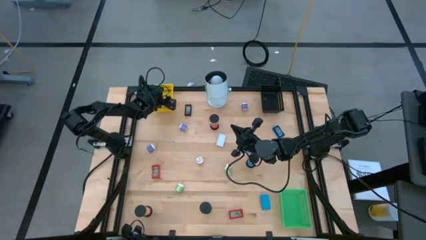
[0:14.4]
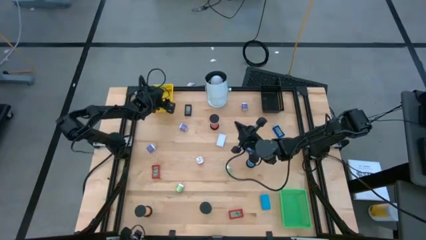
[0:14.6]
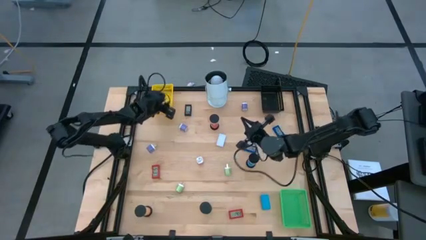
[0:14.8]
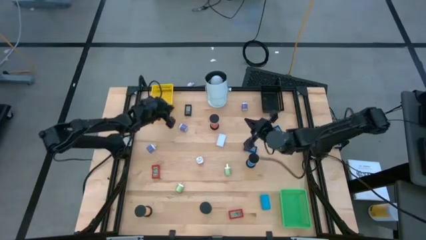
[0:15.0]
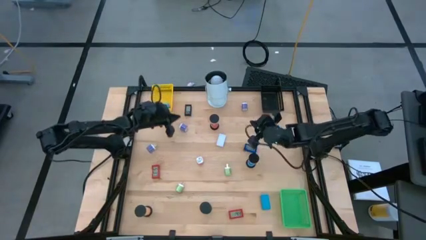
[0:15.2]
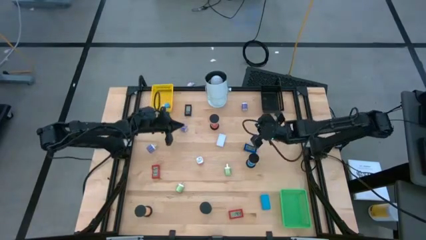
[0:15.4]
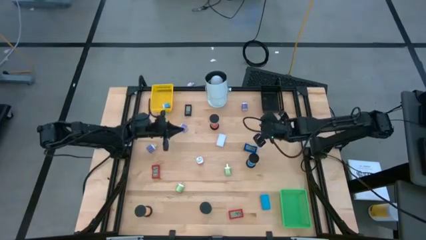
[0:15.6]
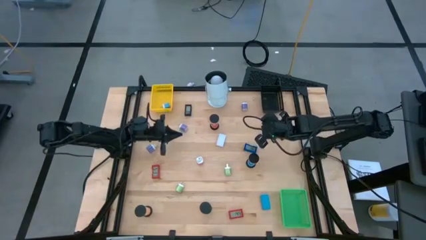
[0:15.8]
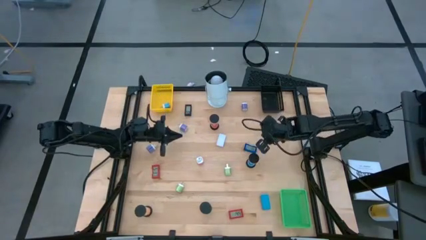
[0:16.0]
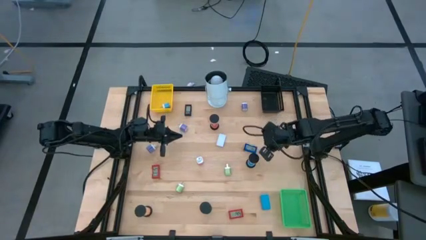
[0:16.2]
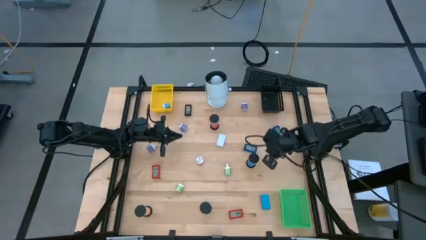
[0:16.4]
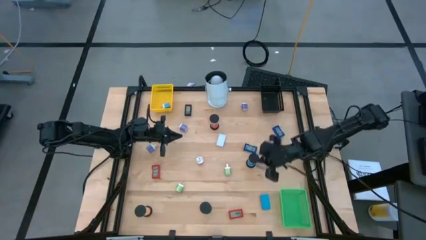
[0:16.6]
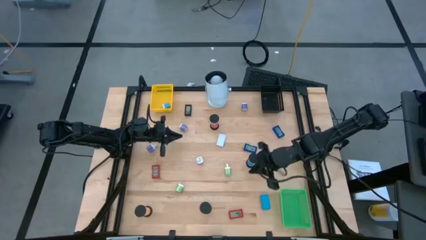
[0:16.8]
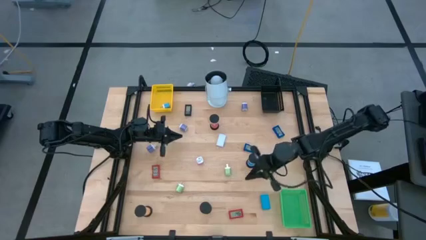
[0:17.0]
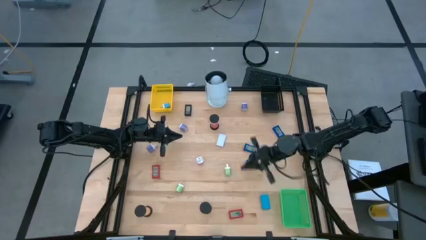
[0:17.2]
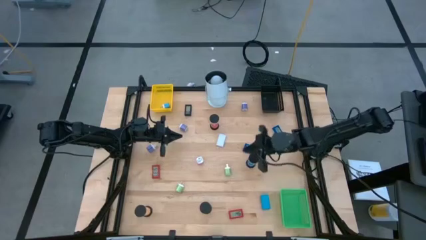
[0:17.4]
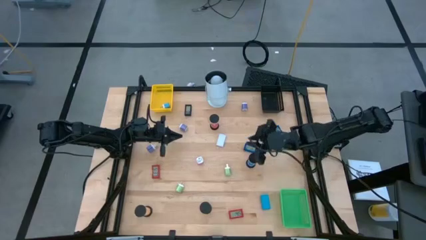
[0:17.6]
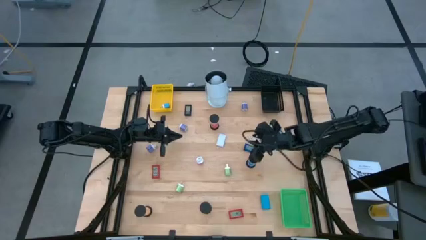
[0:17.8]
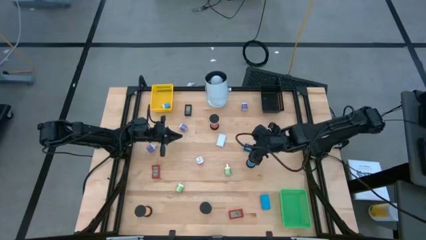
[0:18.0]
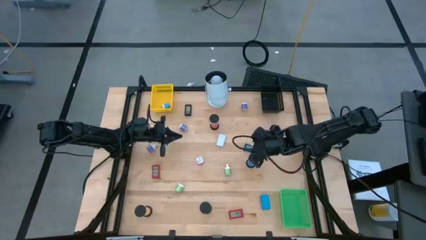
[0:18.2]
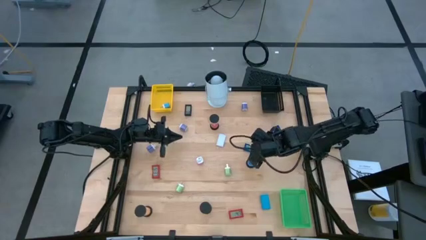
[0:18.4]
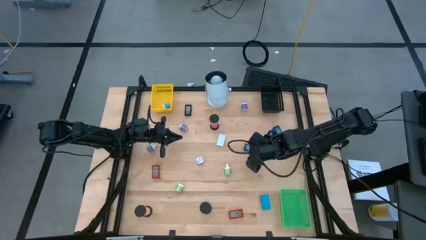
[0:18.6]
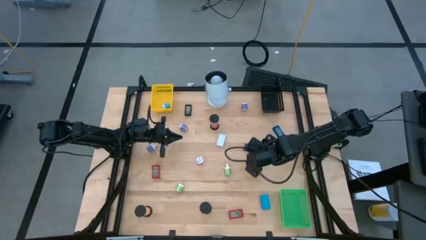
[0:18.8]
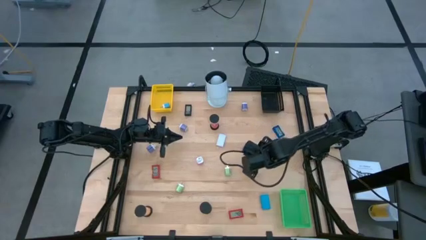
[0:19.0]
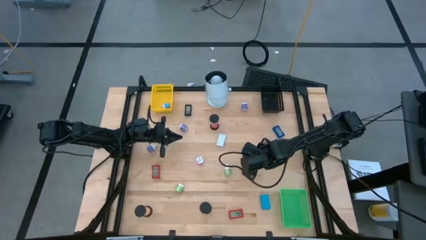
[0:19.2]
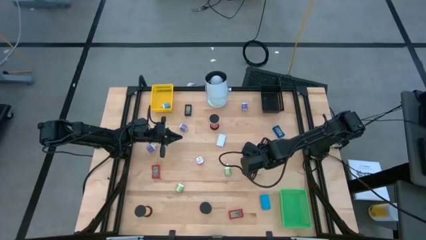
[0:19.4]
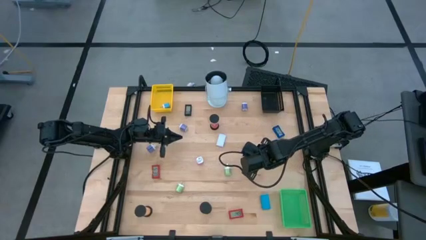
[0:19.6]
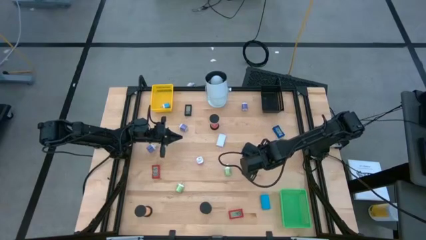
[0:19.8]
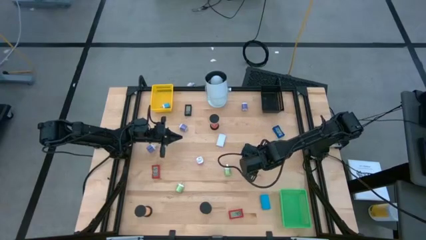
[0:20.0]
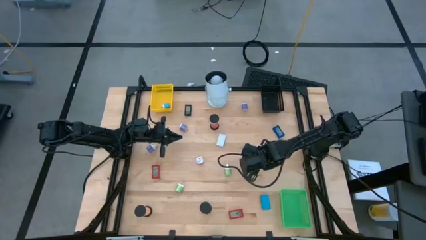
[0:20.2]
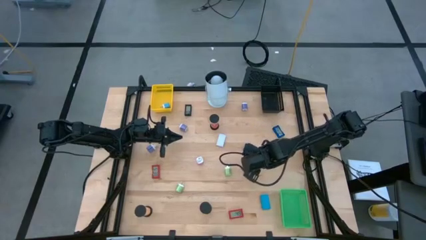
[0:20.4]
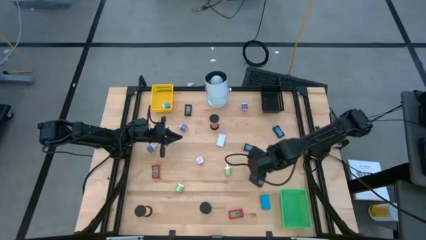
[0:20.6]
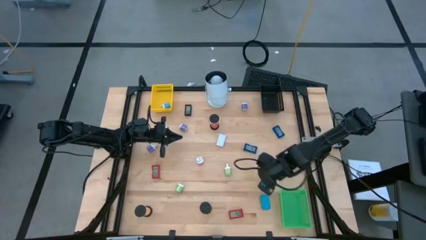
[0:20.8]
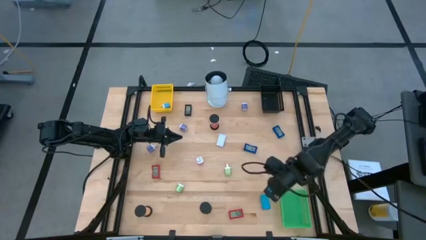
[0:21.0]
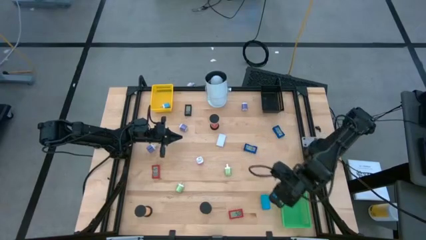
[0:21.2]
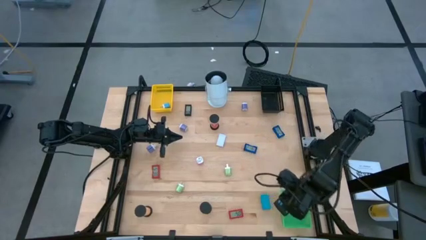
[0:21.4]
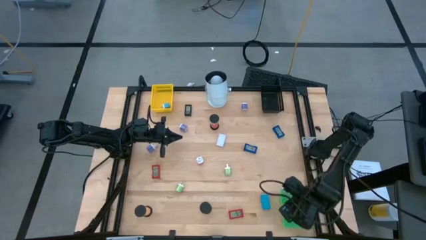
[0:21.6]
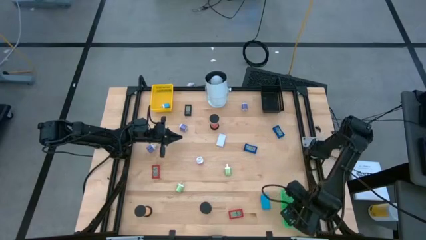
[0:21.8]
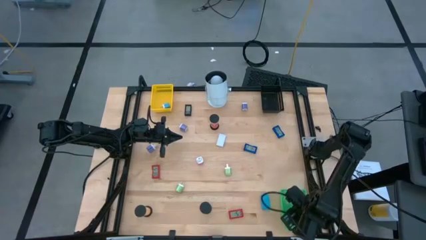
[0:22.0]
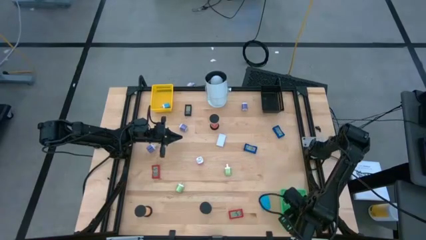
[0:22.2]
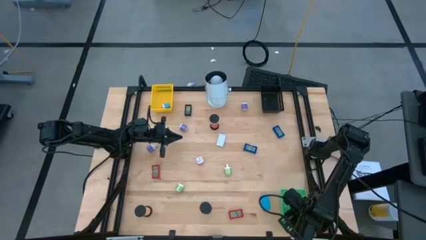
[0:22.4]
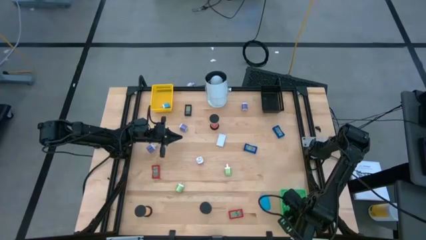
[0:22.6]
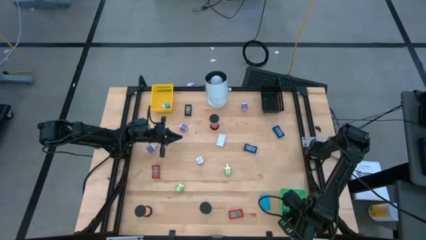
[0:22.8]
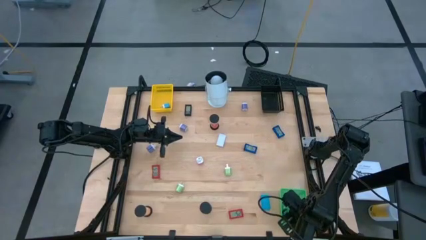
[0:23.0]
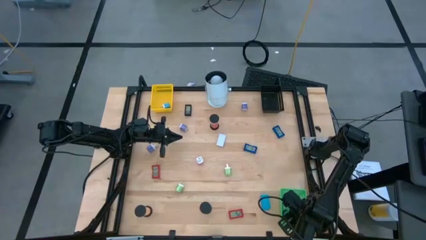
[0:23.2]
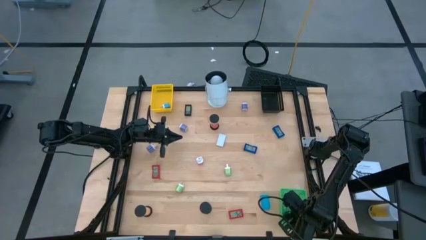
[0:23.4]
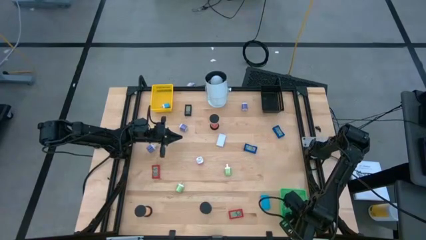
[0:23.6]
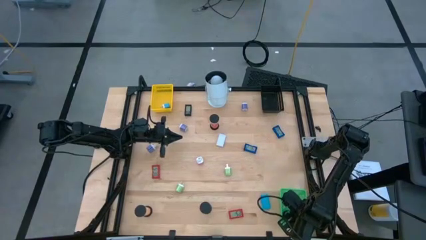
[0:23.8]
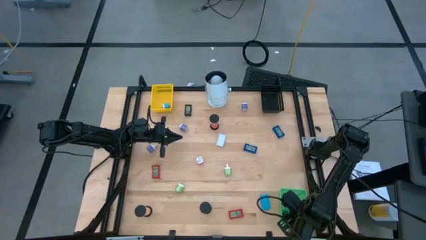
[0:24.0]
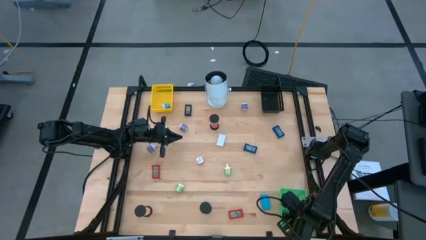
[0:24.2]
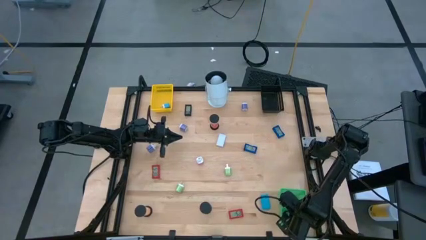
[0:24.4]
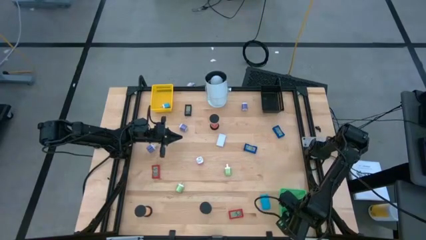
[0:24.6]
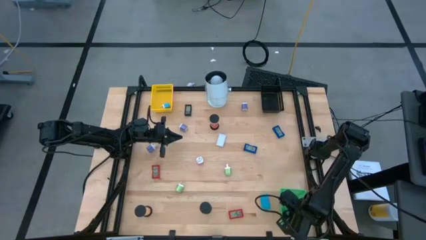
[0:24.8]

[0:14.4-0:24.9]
Task: Pick & Place Office items
Put the blue hourglass into the green bin

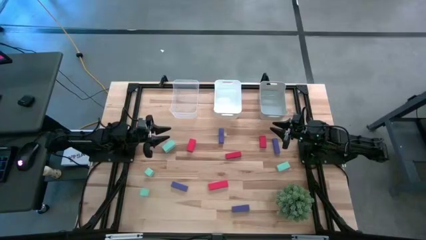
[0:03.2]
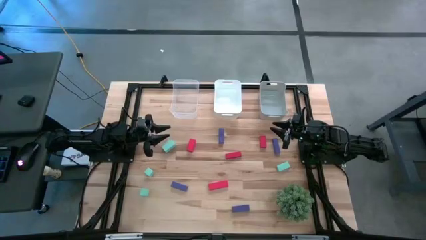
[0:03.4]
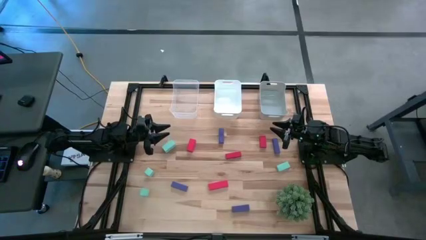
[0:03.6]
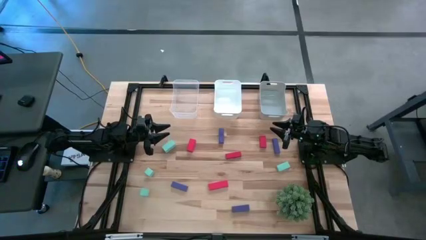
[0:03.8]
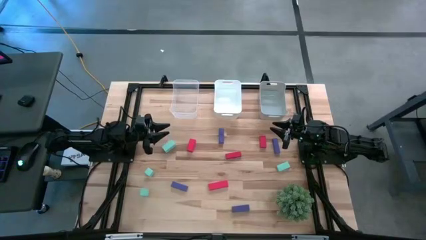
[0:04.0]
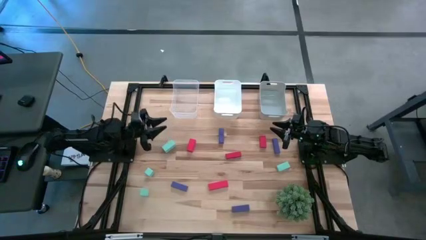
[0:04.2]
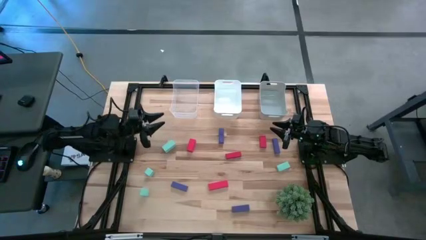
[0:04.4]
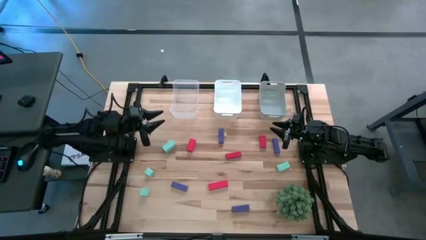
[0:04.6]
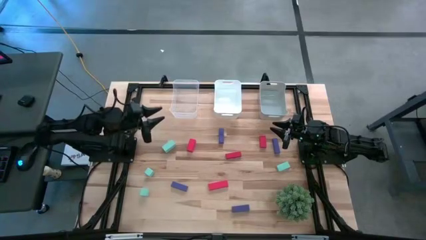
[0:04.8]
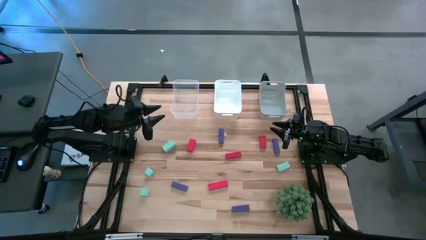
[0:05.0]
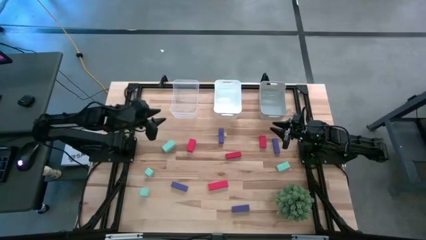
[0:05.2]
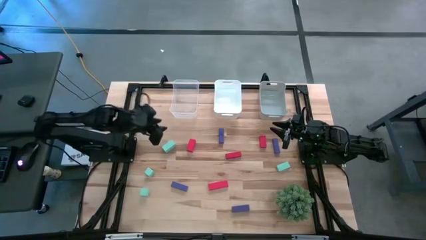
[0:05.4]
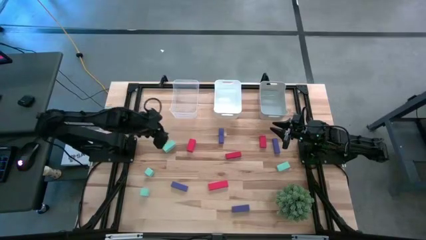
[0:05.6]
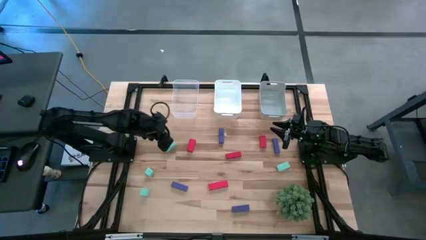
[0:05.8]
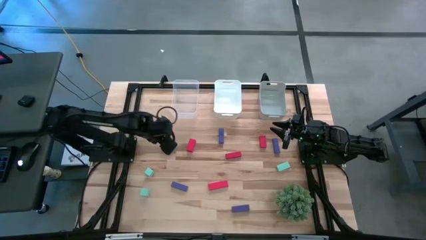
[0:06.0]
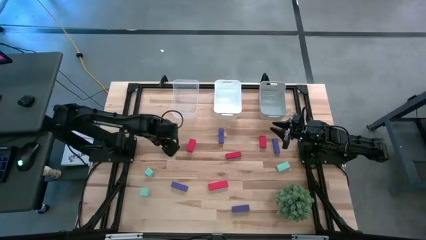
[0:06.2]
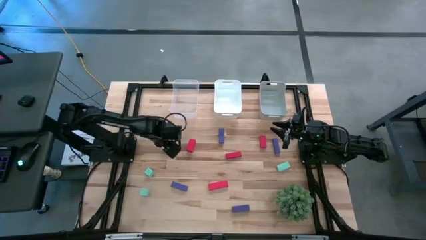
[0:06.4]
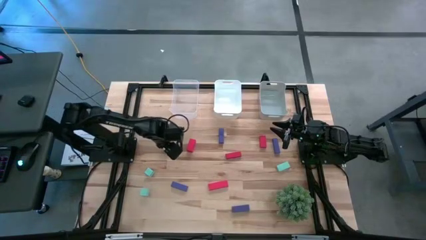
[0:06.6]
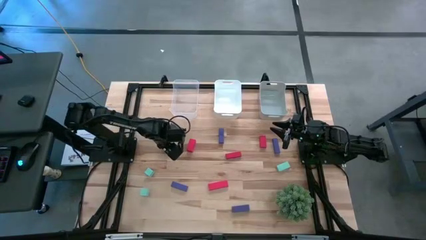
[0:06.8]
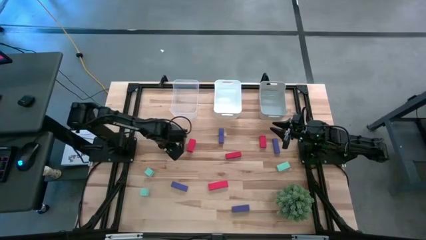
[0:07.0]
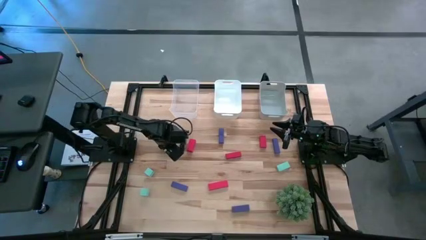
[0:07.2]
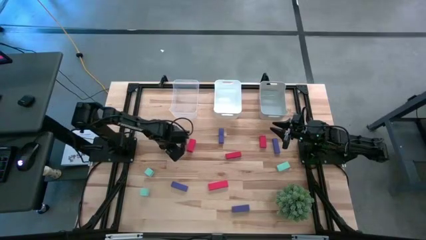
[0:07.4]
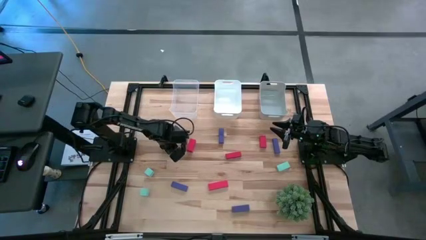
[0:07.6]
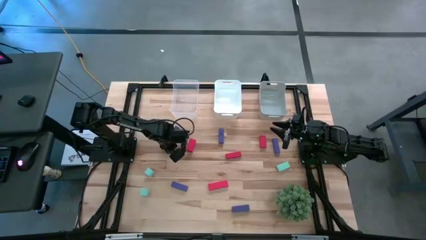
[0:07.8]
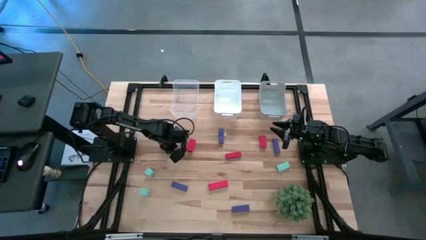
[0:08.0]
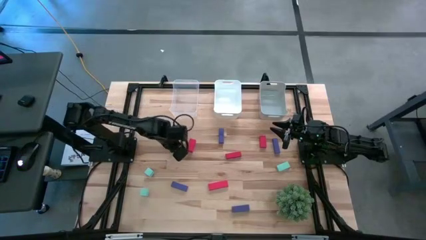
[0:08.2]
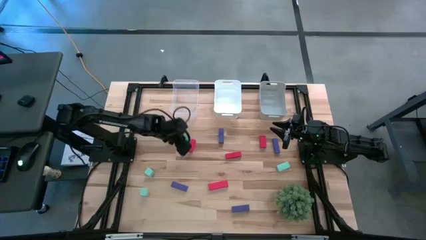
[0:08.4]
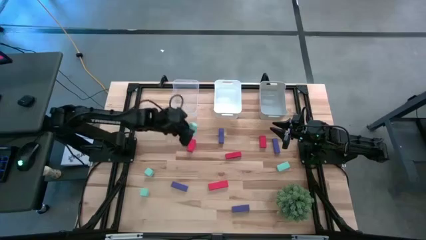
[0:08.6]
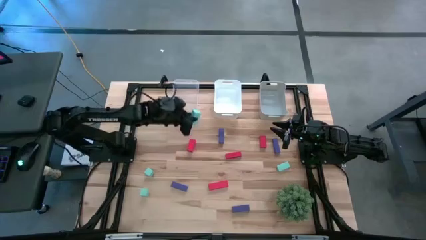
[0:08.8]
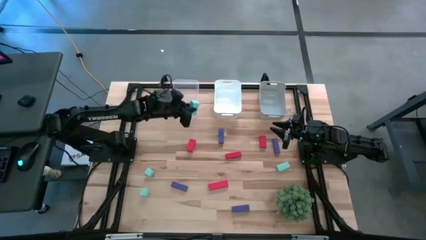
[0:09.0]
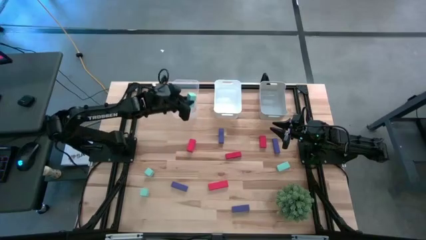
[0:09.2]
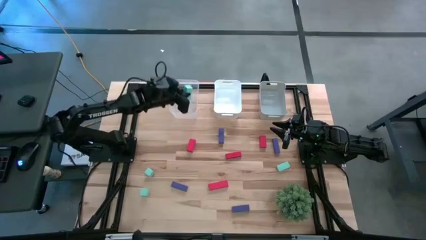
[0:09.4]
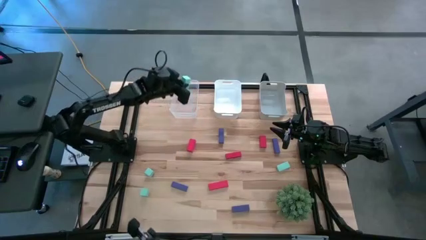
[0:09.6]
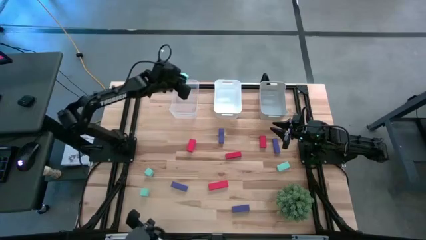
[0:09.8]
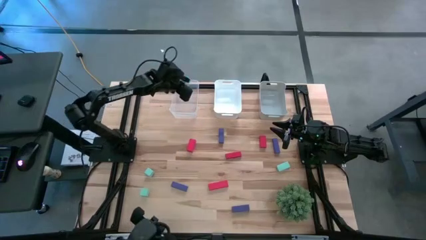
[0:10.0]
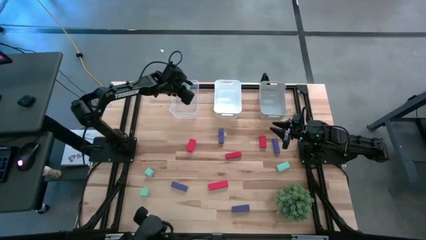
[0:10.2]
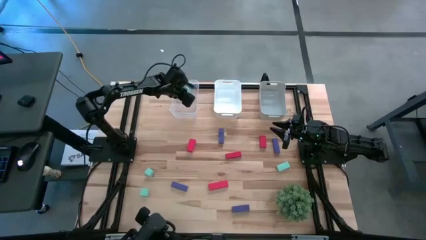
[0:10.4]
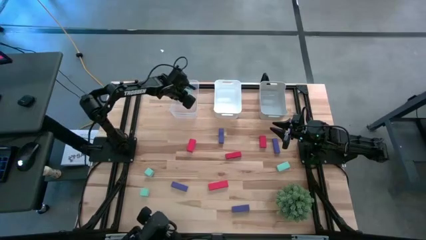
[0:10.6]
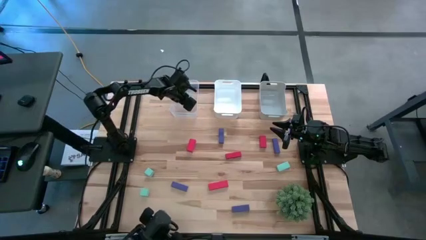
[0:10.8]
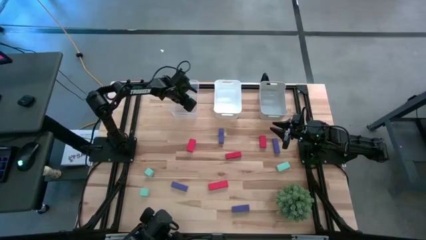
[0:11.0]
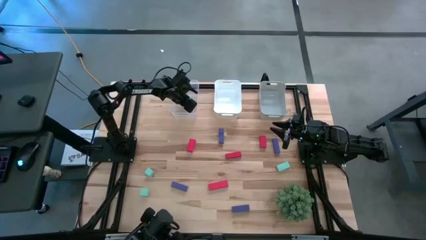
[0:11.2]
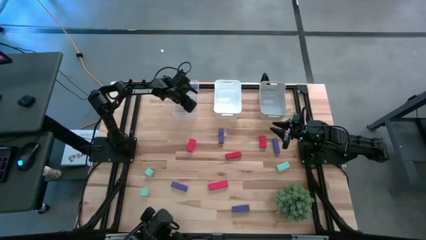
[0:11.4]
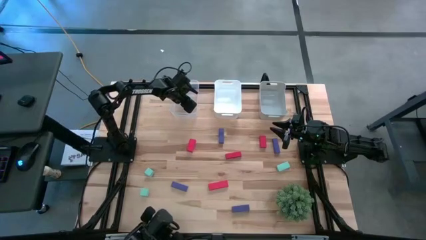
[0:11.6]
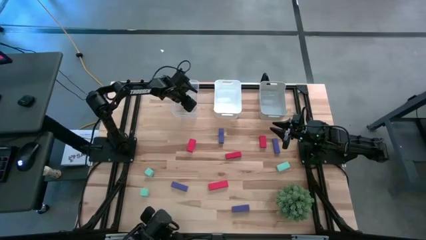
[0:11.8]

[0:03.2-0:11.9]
Task: Sort & place blocks by color
Put the blue block into the transparent bin
